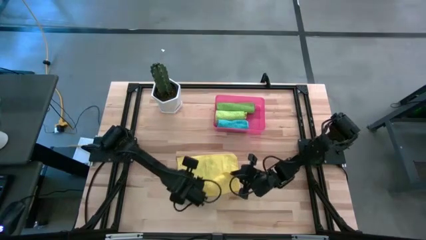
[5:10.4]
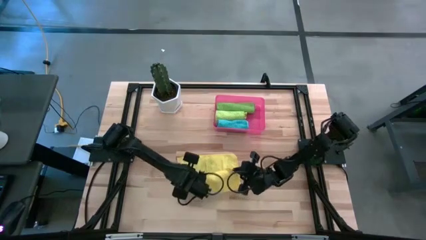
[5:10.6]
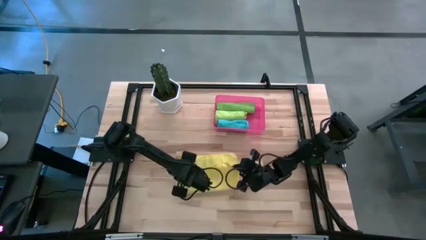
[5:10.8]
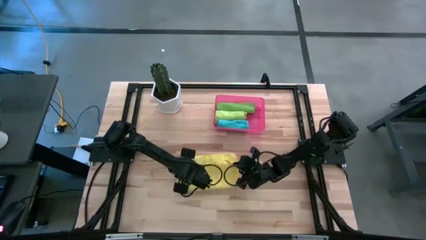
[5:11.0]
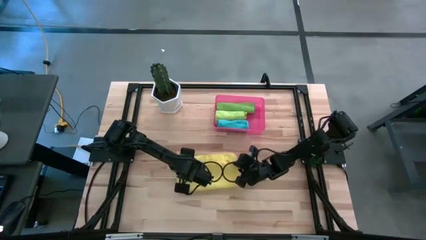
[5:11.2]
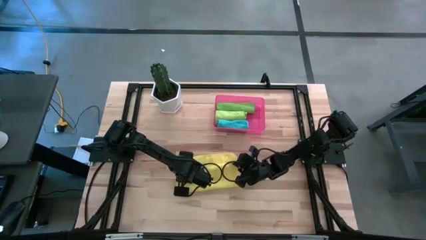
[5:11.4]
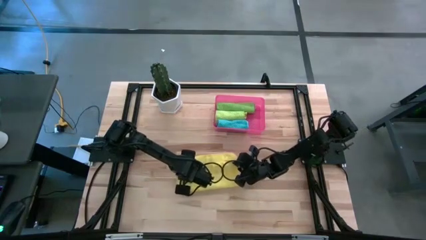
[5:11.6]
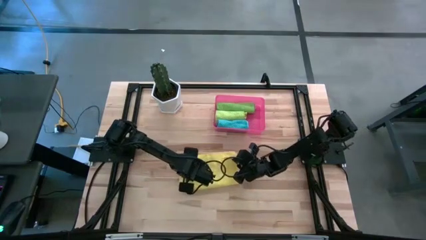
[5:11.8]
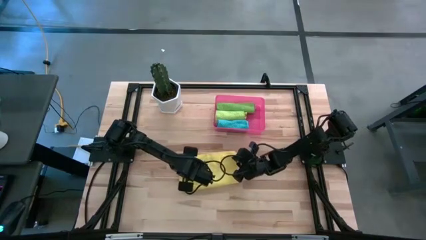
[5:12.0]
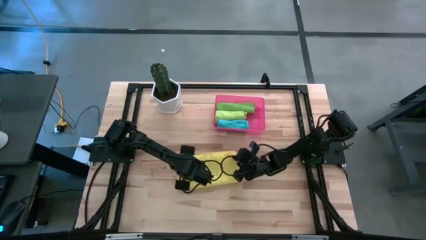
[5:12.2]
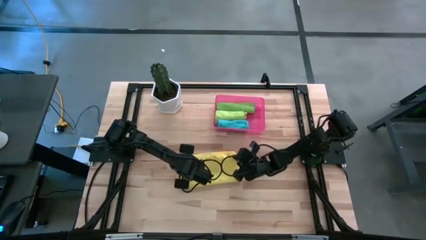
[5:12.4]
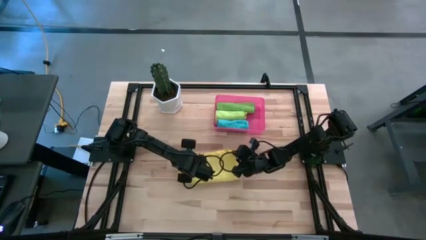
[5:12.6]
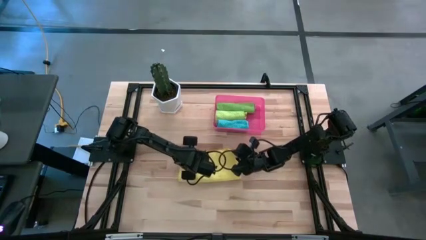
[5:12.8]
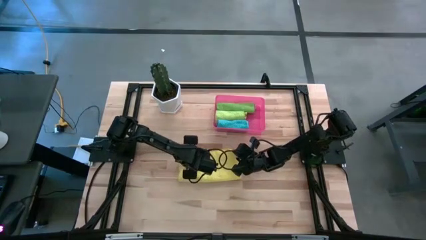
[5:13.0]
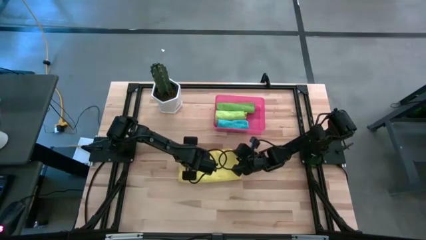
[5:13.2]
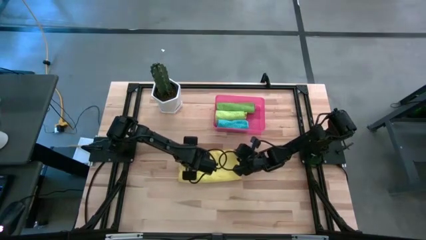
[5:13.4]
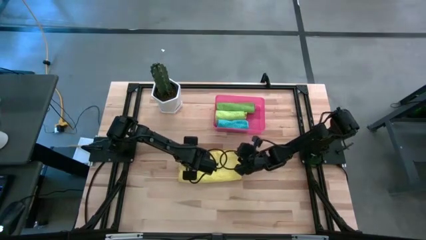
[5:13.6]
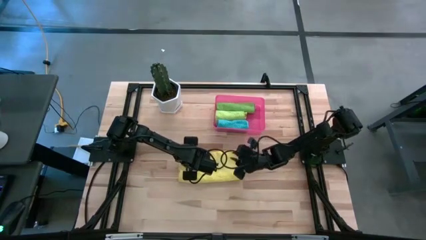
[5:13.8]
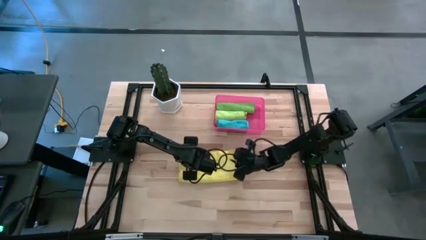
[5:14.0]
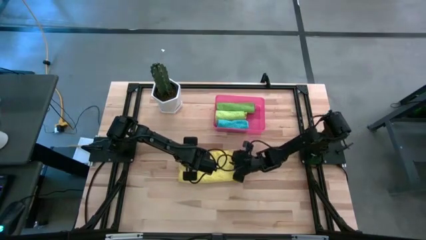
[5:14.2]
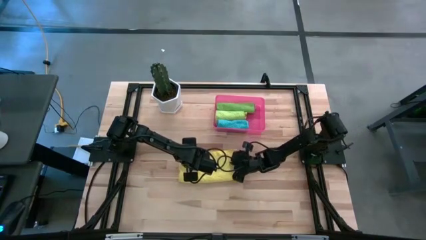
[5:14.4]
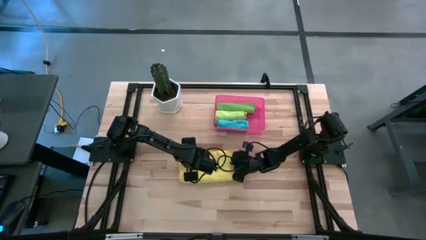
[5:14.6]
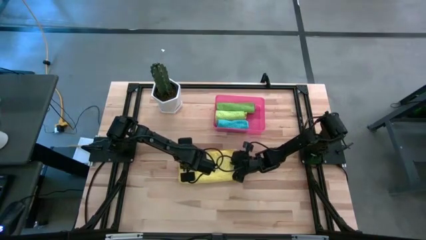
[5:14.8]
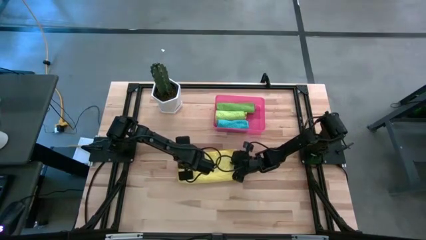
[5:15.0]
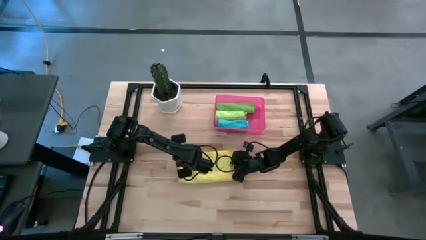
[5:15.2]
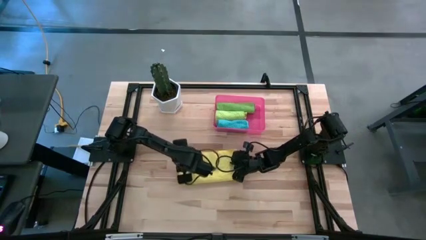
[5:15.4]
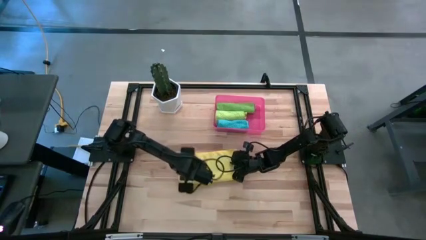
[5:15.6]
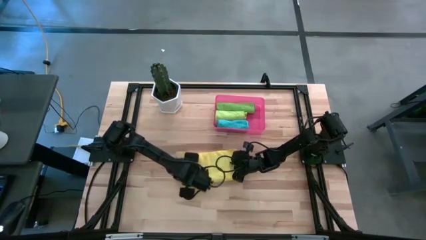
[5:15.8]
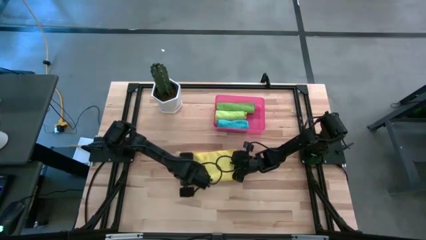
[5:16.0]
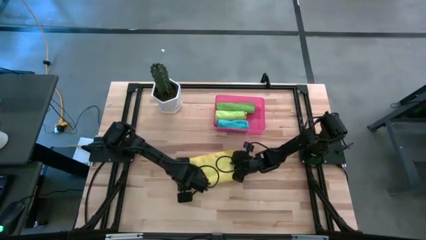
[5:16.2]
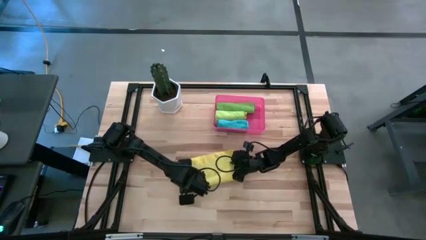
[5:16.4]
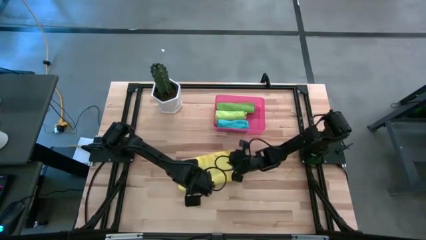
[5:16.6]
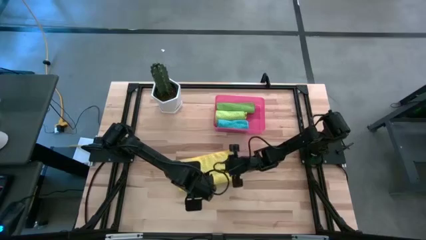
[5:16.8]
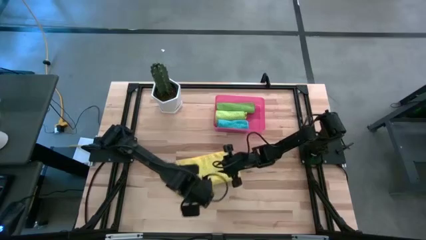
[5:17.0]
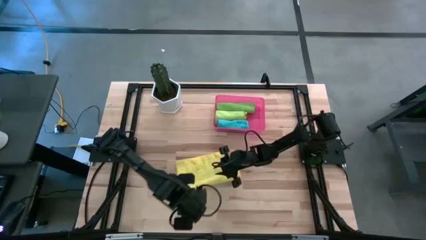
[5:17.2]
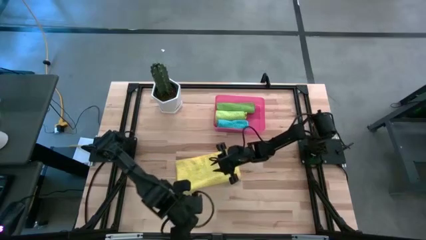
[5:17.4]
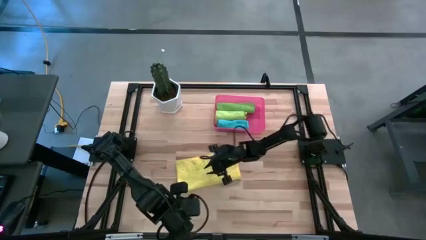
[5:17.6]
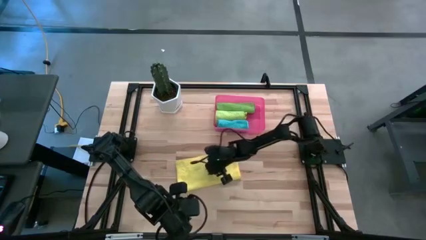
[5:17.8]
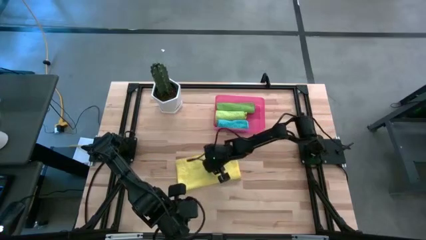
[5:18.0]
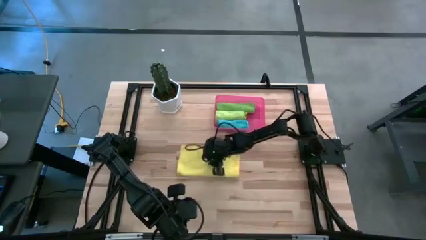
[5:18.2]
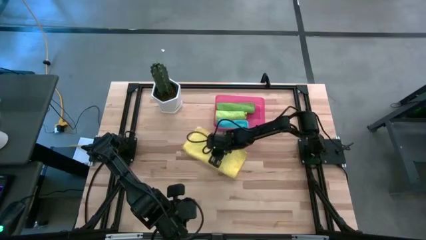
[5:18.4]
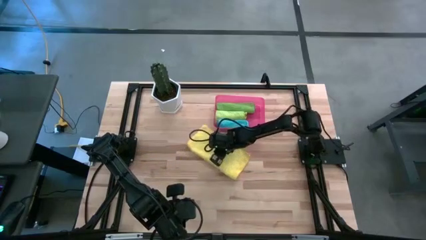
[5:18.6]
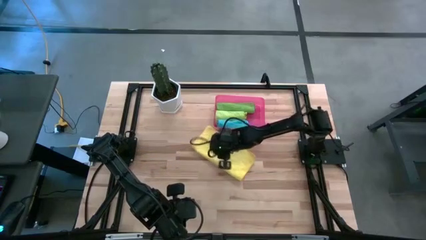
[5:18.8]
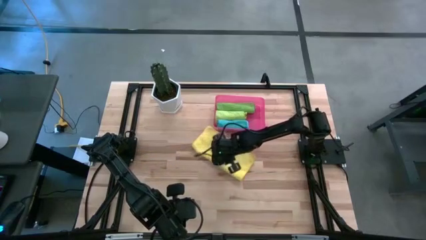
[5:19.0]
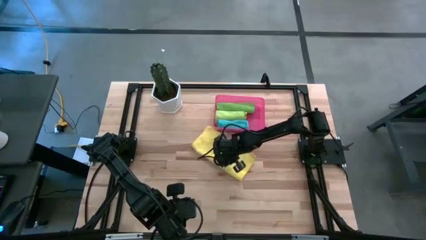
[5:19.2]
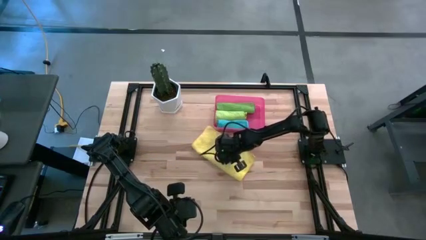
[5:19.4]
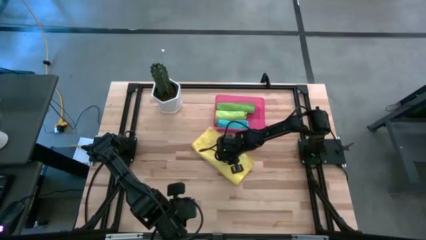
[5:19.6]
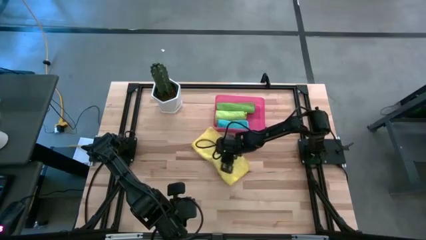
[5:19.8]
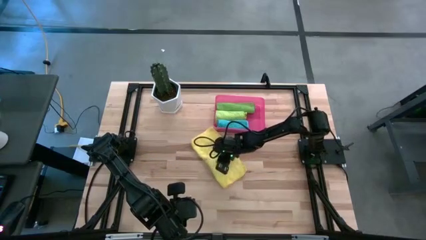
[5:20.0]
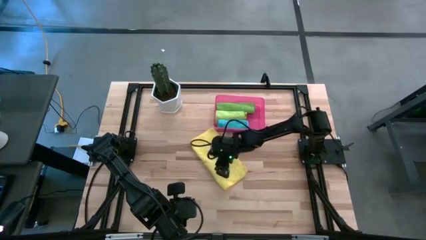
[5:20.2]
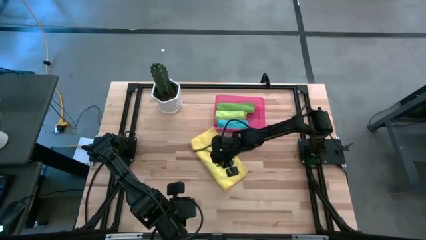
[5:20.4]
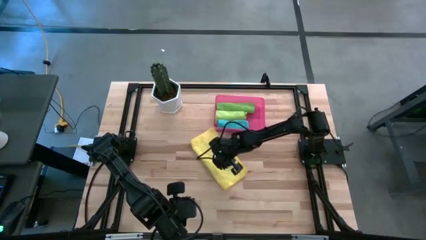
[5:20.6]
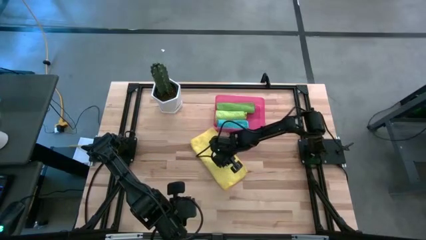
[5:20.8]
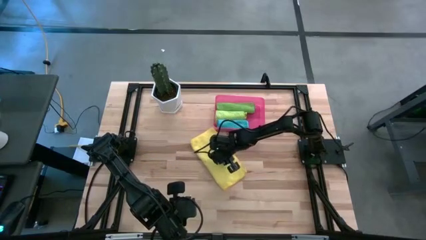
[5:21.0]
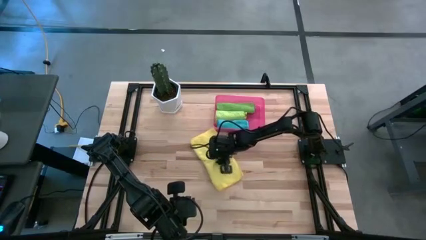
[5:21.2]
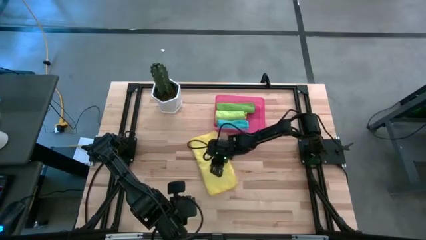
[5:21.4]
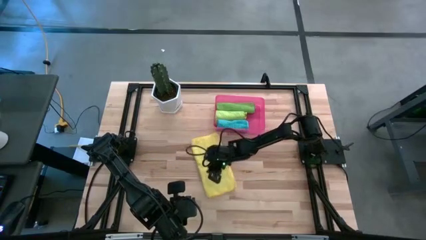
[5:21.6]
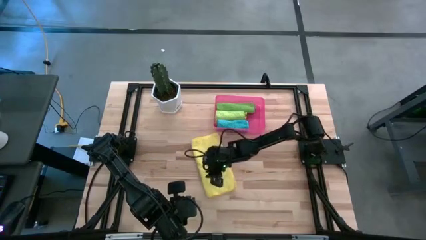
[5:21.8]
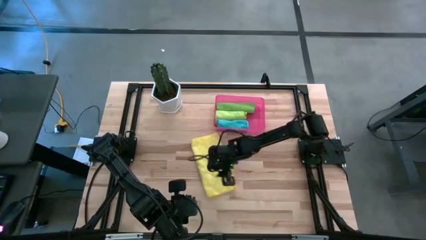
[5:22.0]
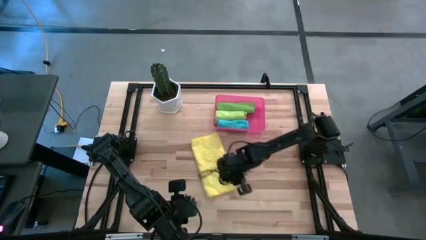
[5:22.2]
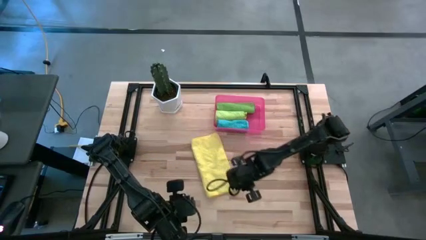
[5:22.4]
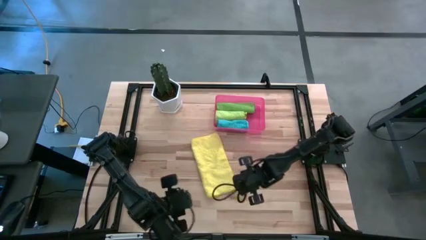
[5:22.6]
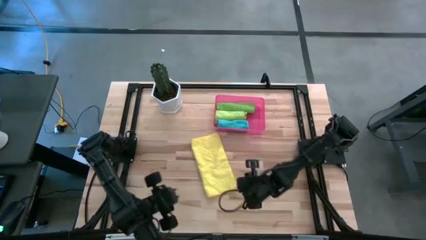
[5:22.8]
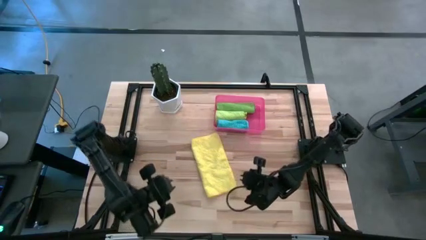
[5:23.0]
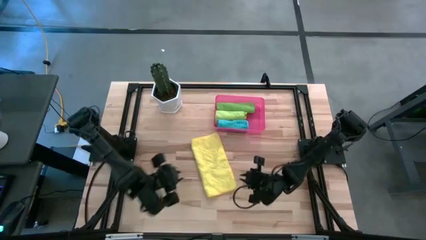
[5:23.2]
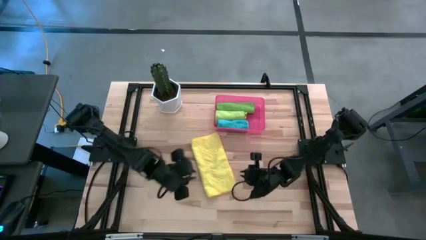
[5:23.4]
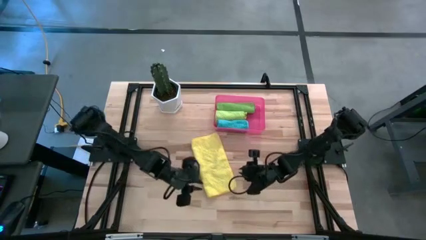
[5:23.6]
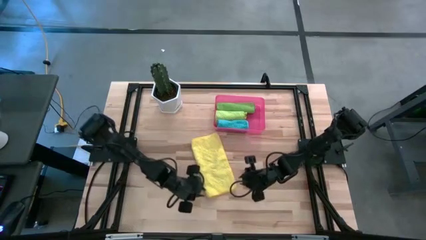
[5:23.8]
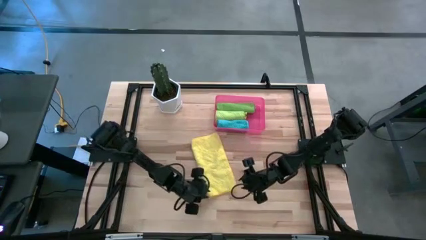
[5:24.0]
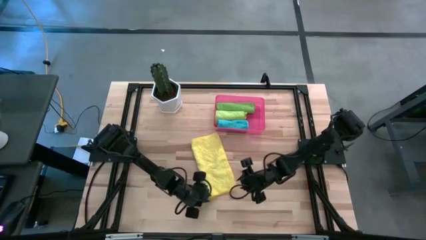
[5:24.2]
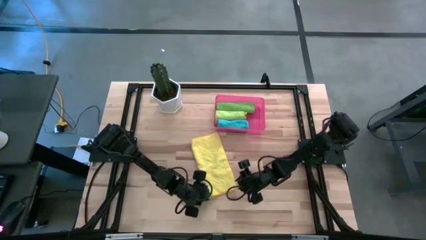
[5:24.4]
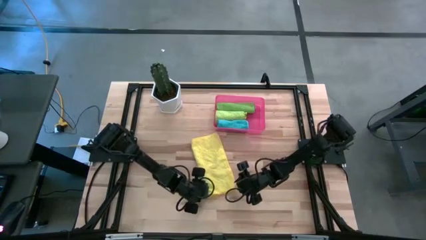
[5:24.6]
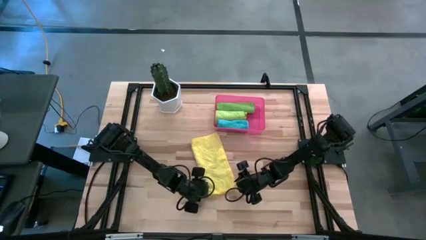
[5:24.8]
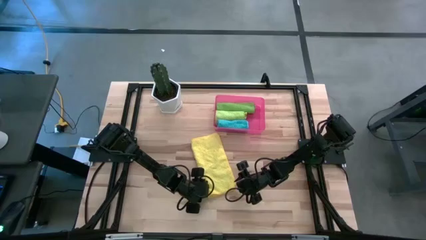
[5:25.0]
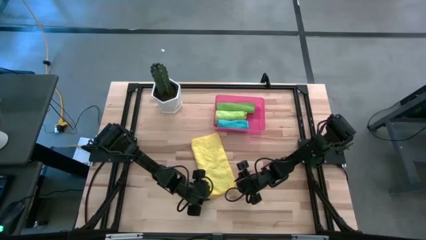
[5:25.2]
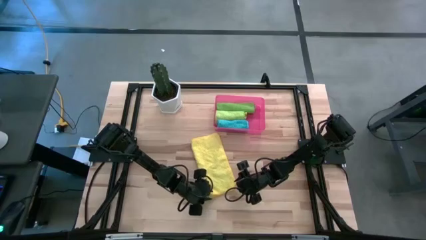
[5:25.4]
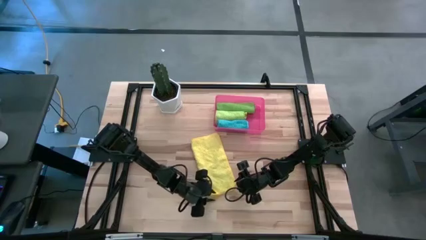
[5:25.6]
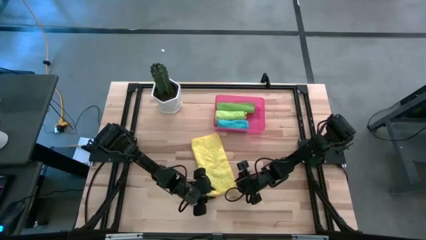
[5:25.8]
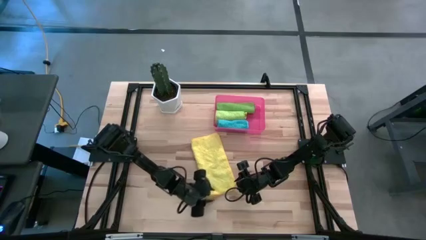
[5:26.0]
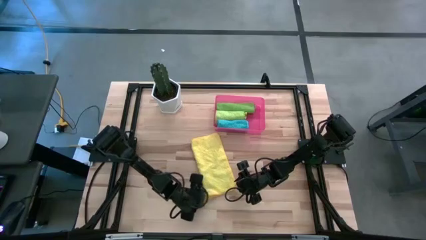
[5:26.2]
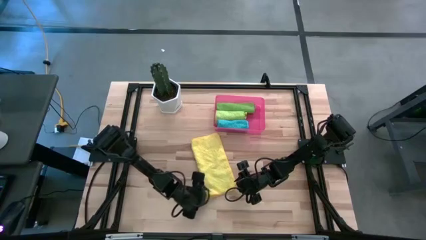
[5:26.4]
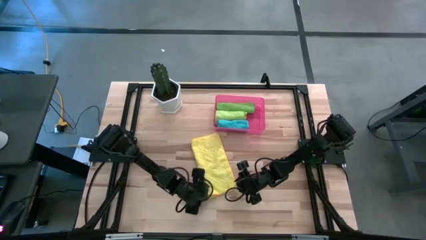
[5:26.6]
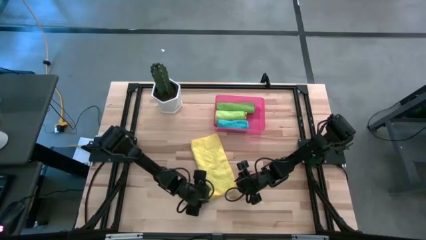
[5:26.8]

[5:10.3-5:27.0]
Task: Roll microfiber towels into tight, uniform cylinder then place into a basket
Roll the yellow microfiber cloth
